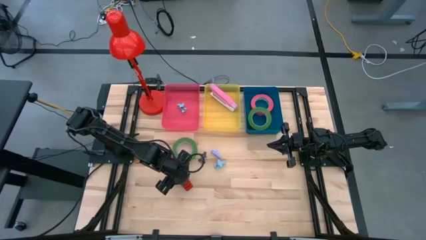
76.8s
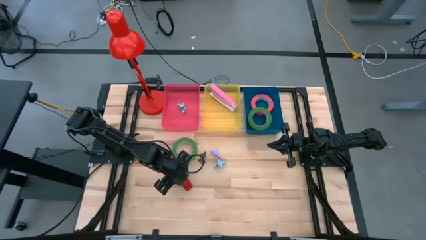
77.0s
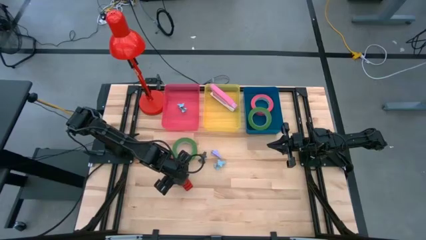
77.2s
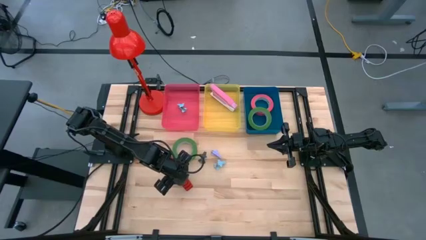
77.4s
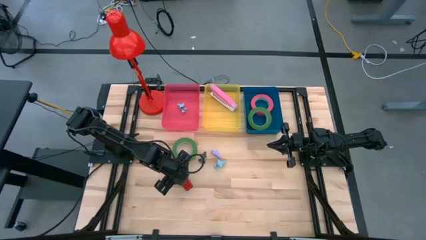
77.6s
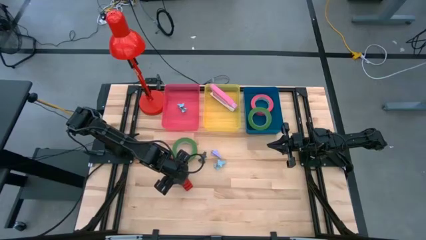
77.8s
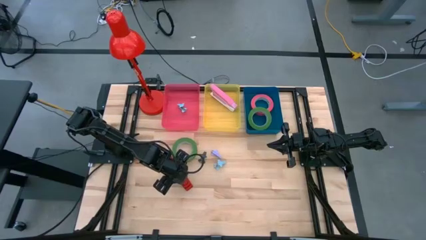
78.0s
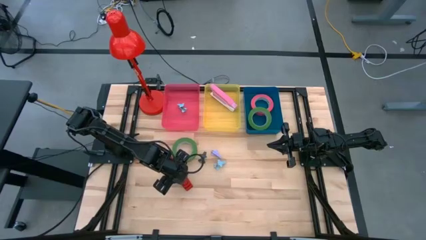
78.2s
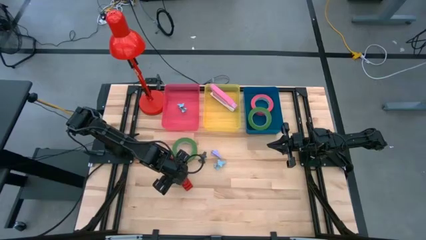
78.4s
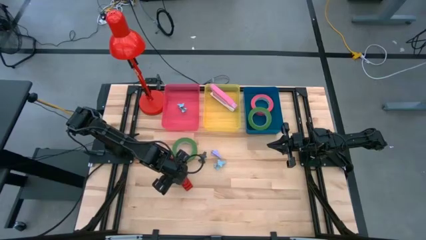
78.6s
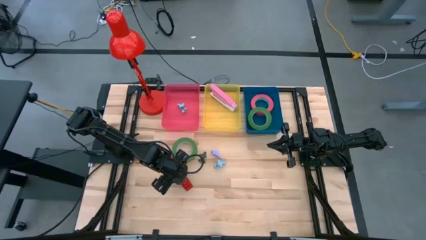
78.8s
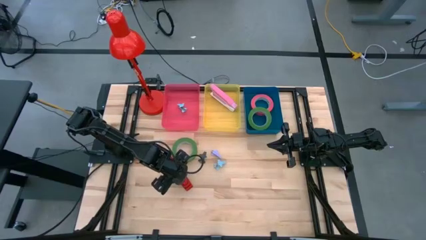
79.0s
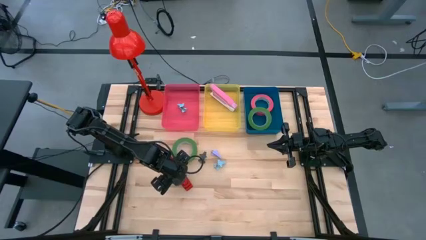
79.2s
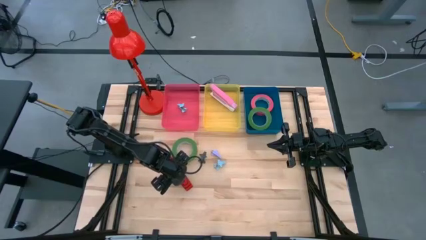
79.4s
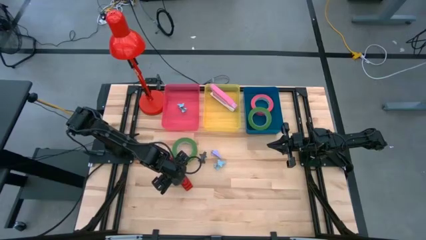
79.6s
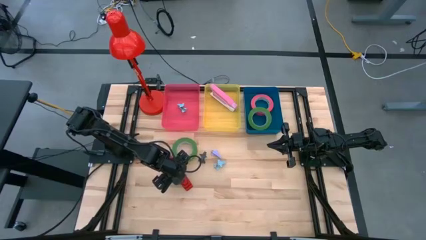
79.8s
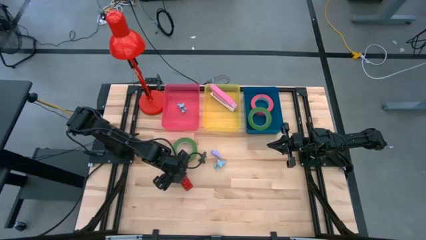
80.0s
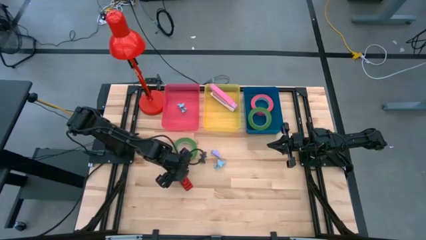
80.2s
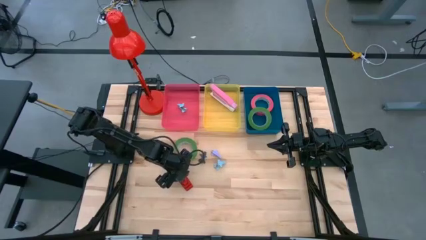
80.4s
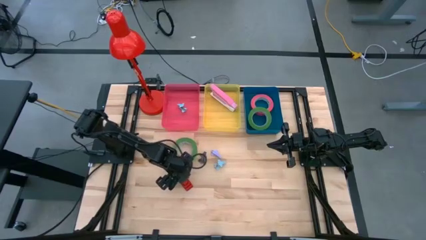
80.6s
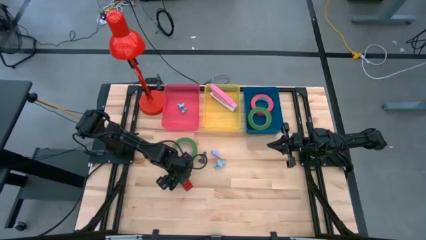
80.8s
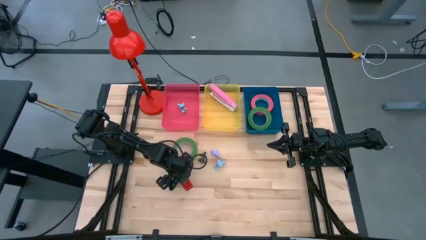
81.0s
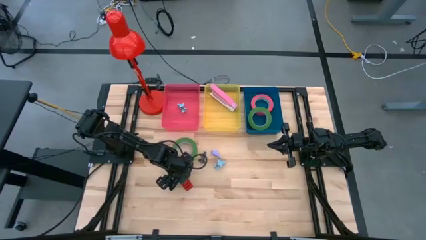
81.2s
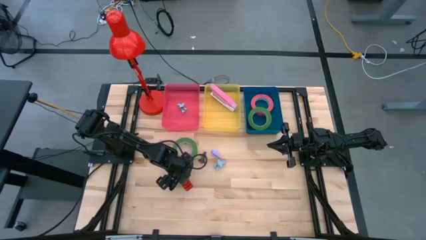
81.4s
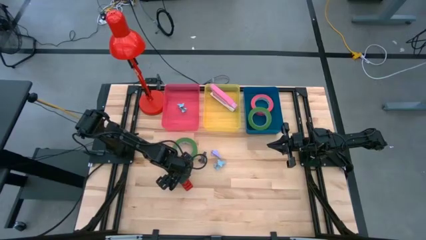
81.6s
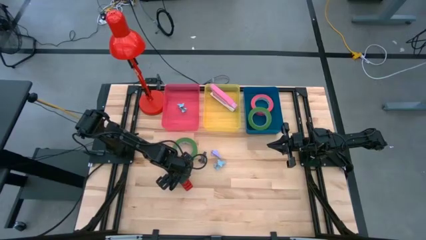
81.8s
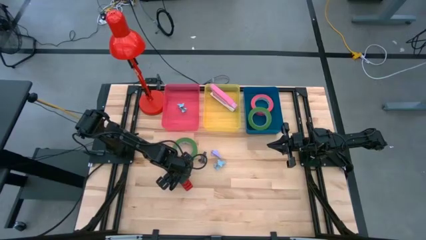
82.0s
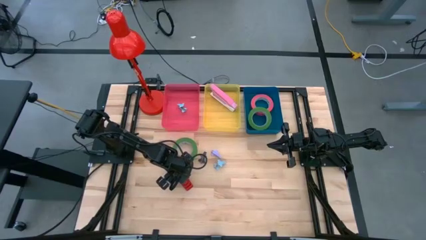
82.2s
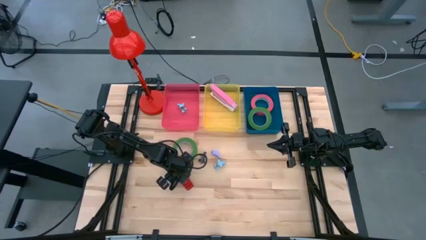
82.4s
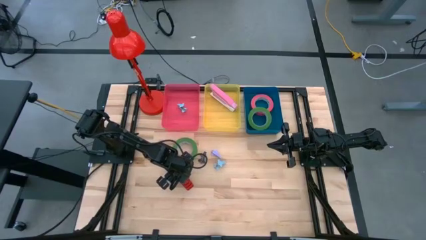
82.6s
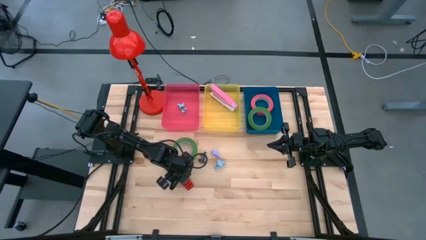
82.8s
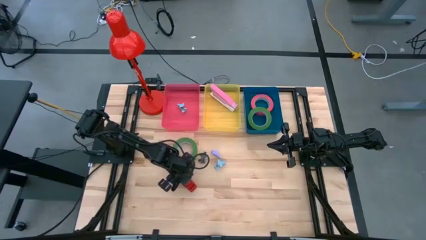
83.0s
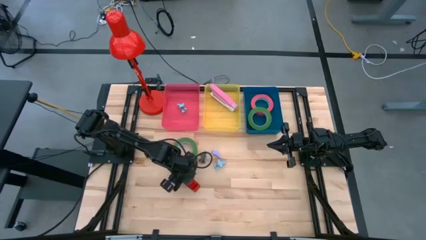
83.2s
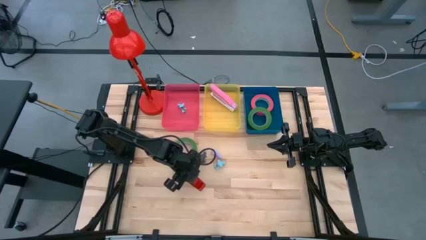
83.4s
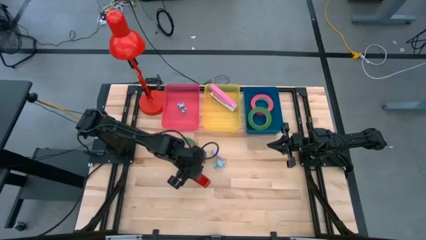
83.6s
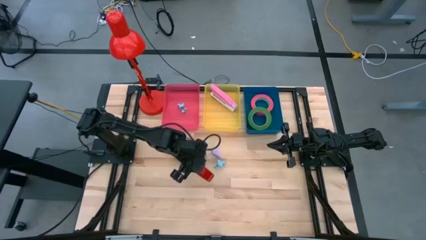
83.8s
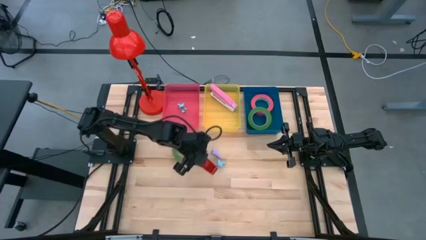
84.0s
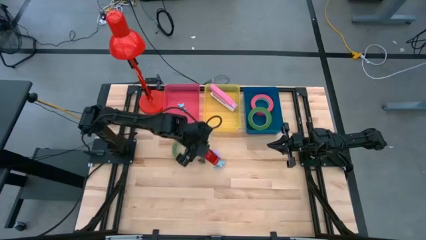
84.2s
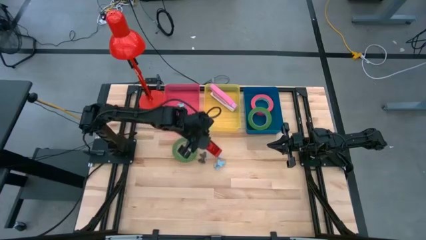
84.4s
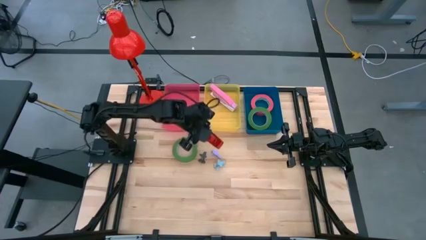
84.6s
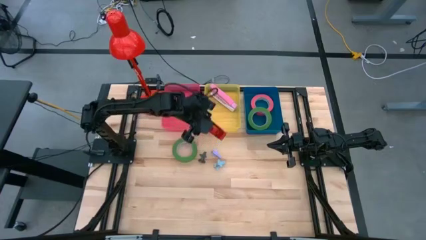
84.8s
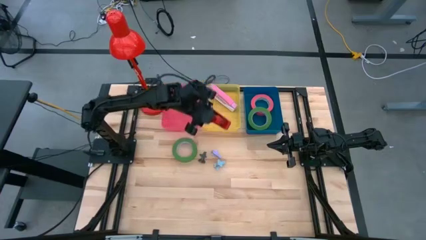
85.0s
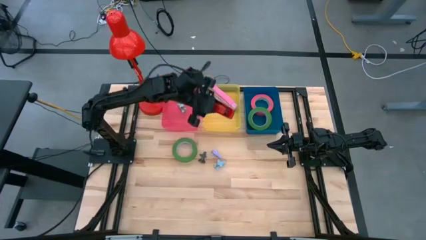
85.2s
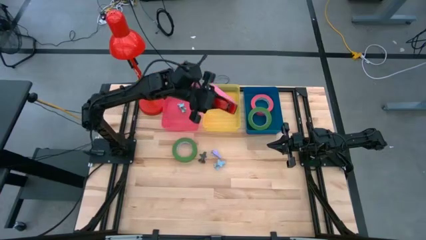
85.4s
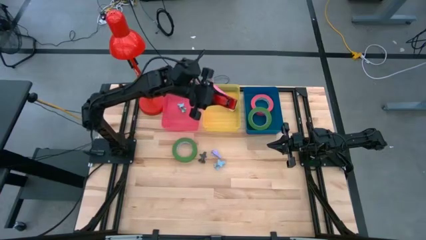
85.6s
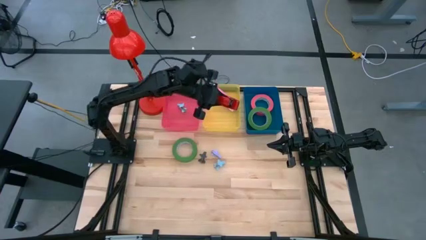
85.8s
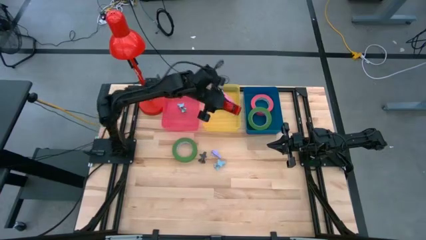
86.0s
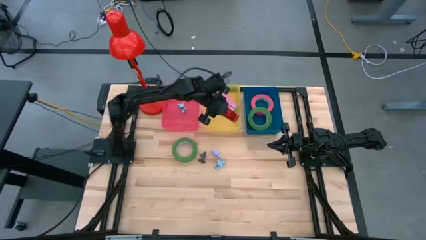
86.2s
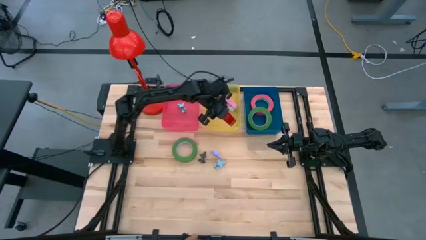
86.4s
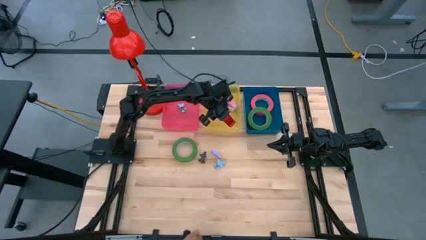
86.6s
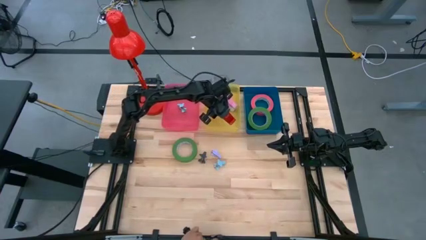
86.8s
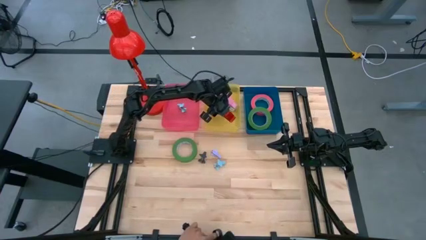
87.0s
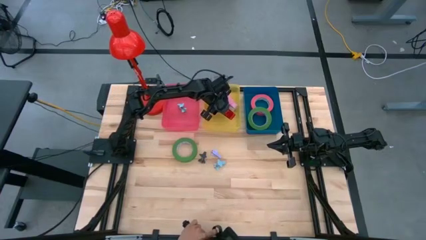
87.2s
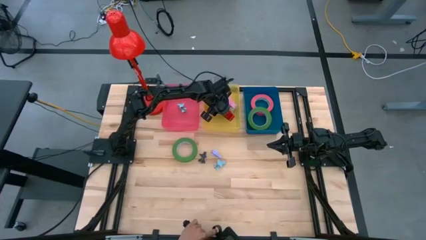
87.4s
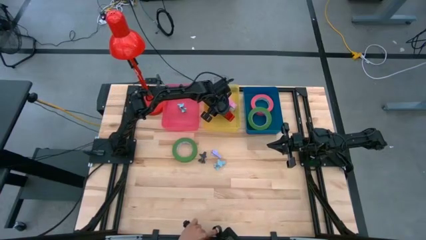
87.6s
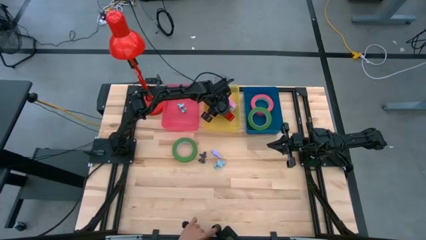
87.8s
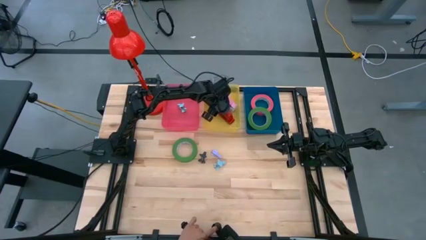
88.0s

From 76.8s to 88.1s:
Task: Pick and place Stapler, Stapler remover, tape
Put the red stapler into the yellow bin

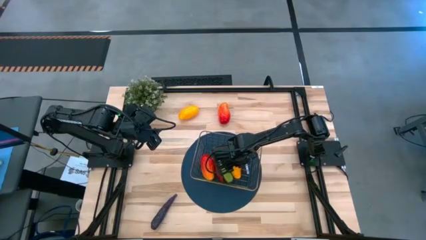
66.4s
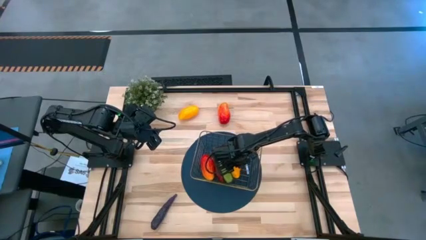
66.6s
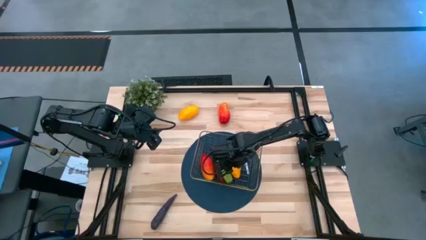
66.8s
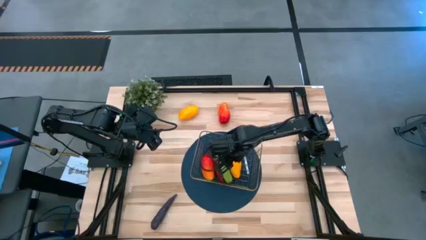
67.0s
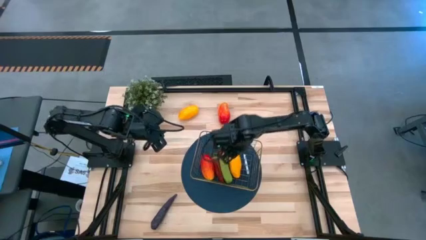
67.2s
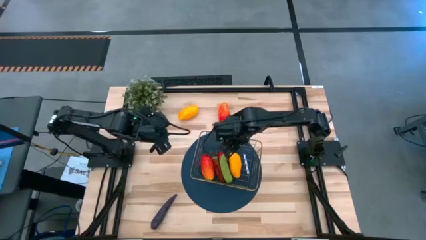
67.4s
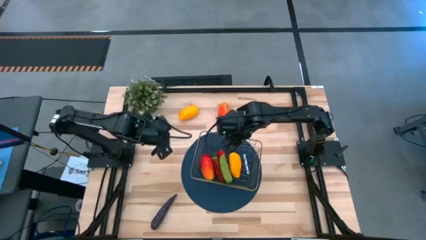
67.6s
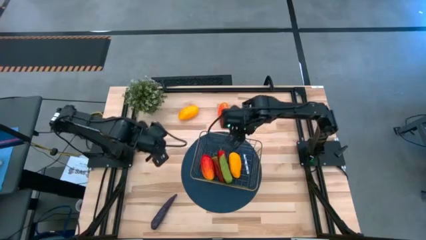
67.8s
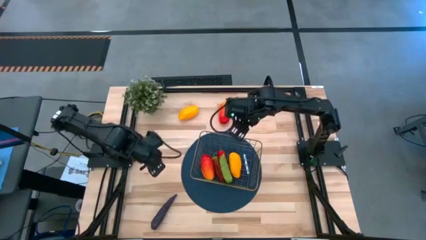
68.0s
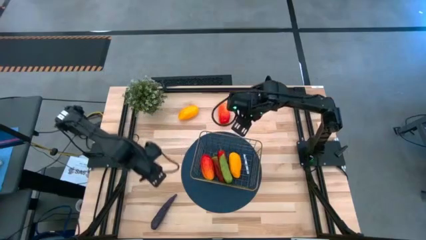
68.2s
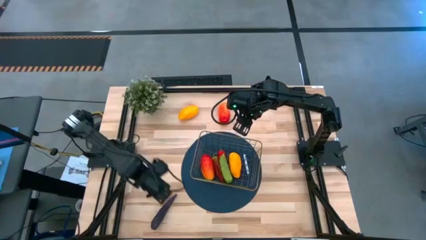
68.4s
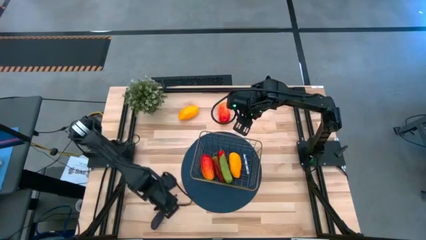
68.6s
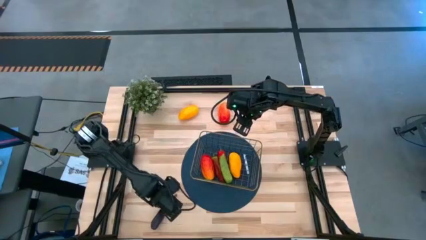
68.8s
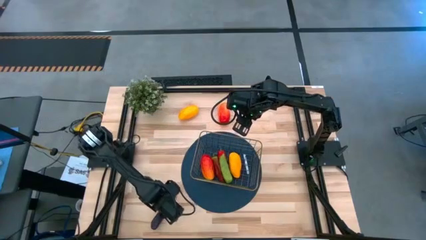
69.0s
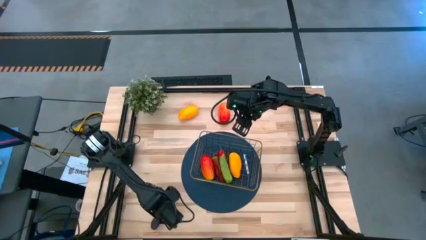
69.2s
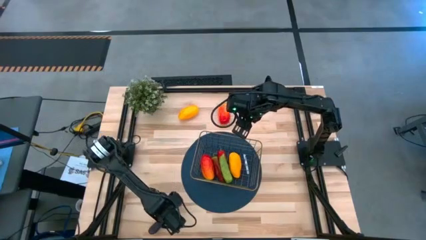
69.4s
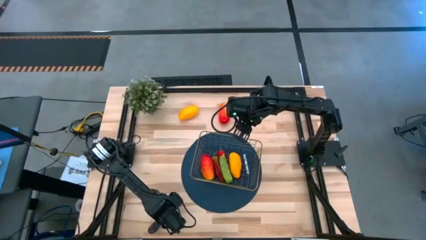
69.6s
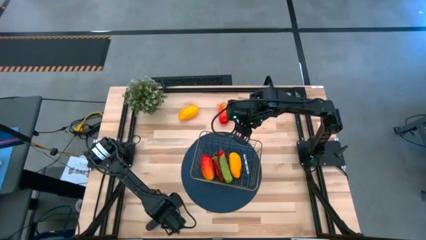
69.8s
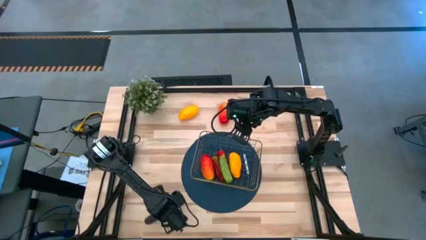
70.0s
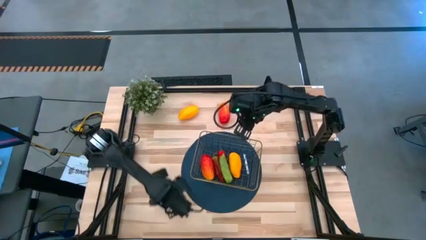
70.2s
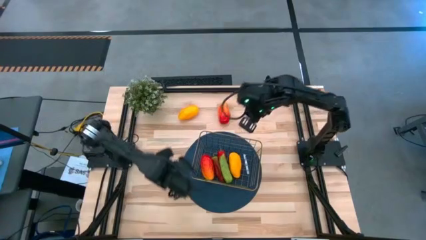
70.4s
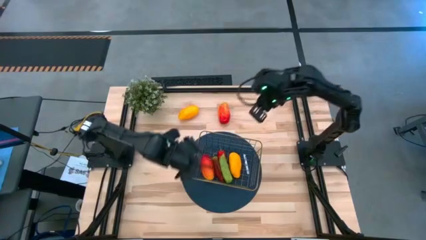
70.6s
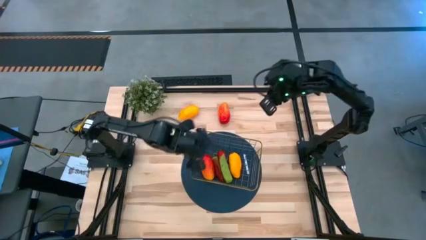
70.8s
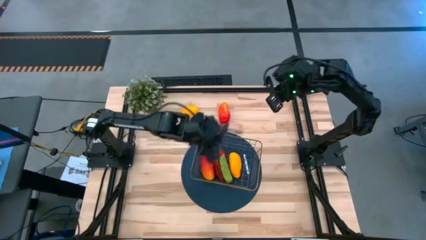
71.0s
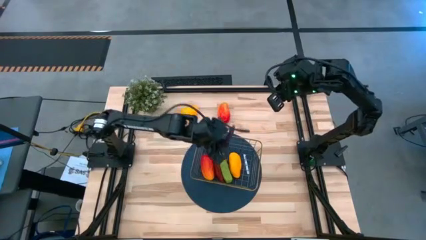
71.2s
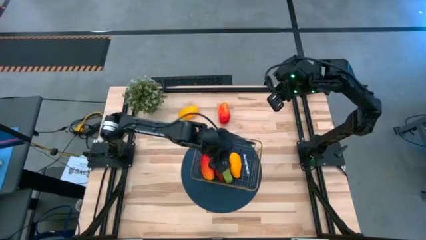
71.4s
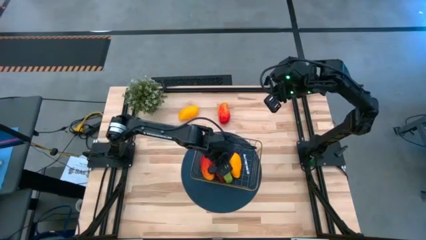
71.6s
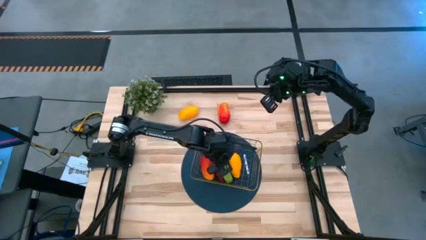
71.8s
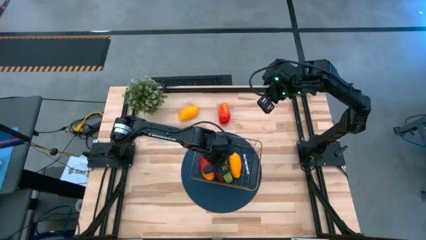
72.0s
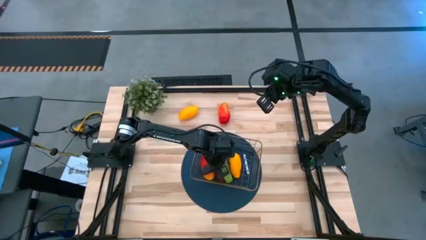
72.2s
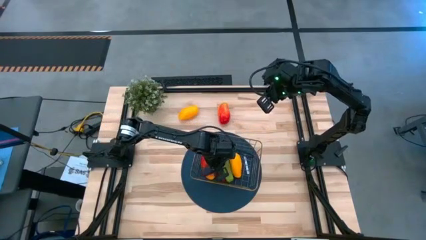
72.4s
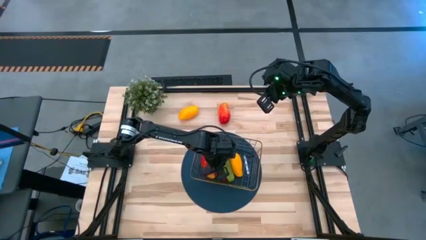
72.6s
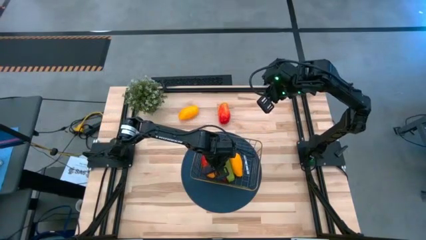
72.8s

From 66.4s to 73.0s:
Task: Build produce basket
Put the eggplant into the gold wire basket
